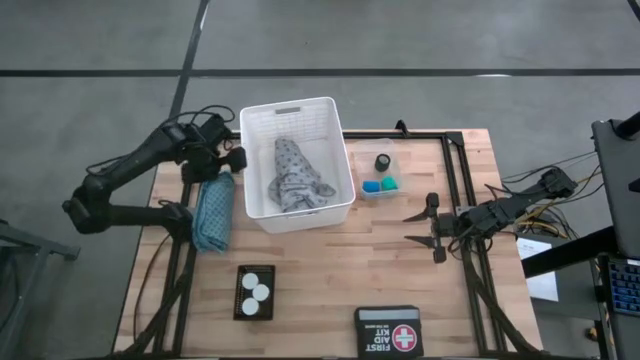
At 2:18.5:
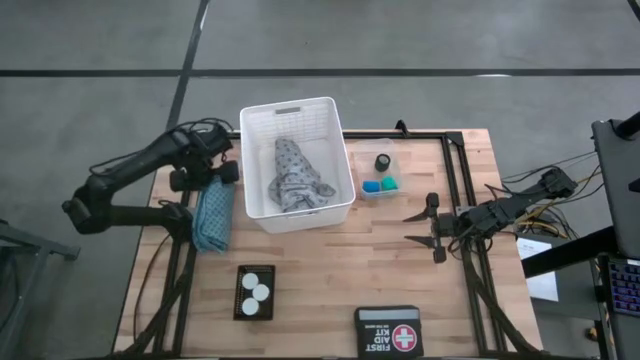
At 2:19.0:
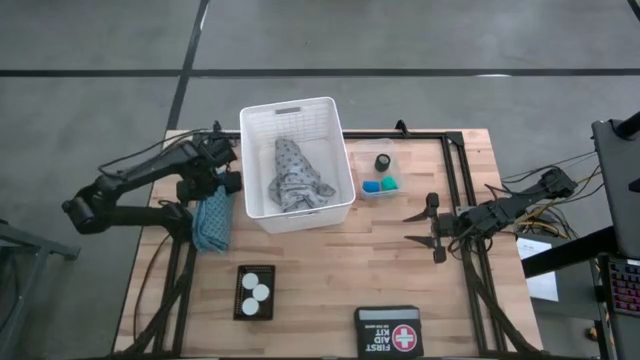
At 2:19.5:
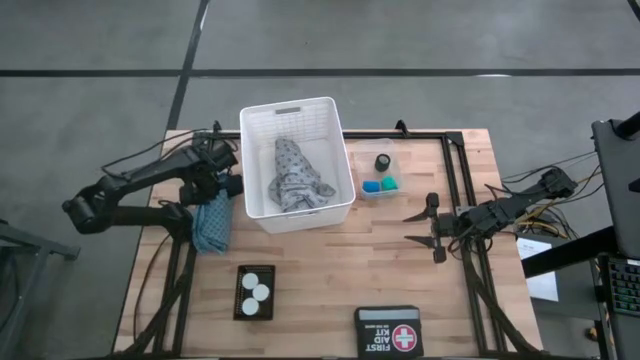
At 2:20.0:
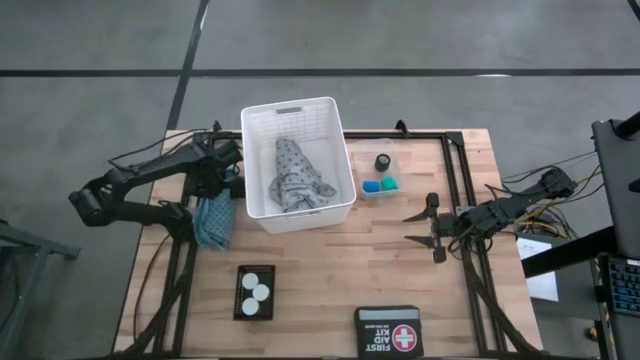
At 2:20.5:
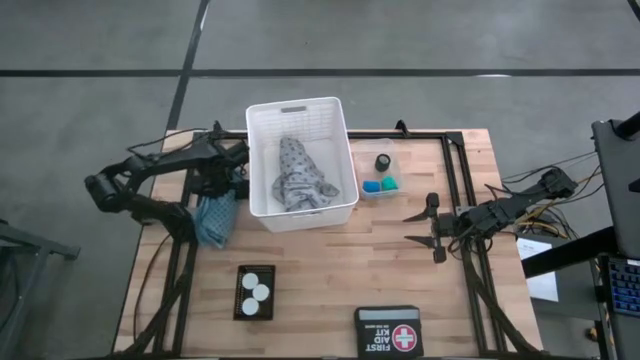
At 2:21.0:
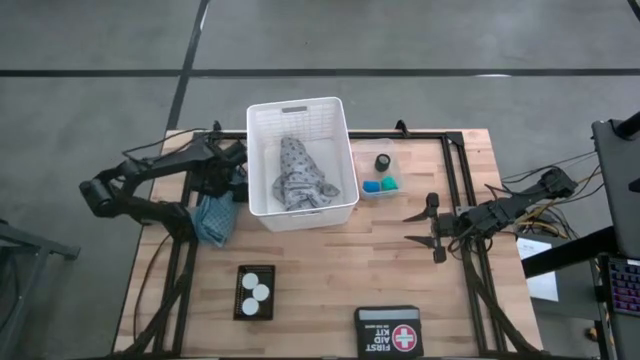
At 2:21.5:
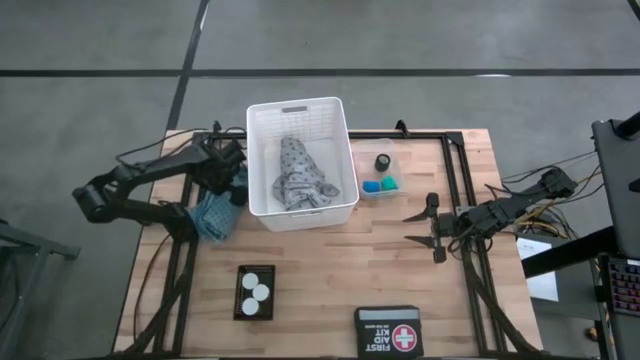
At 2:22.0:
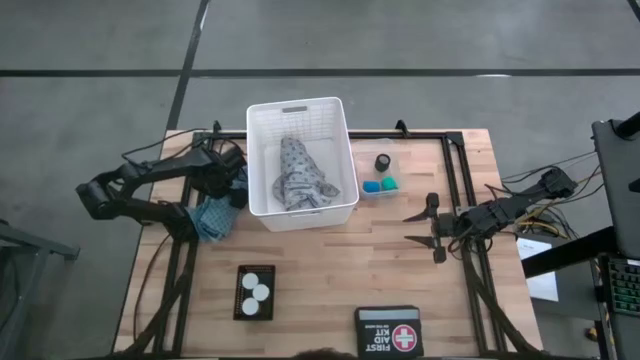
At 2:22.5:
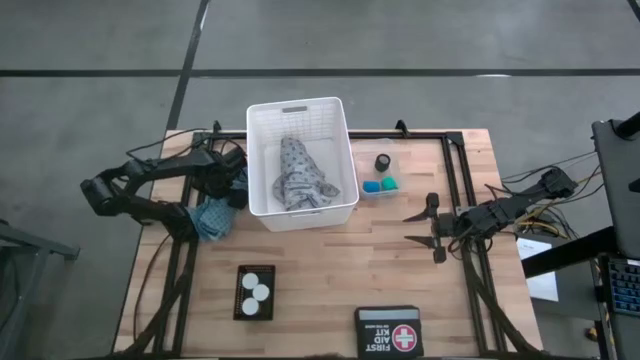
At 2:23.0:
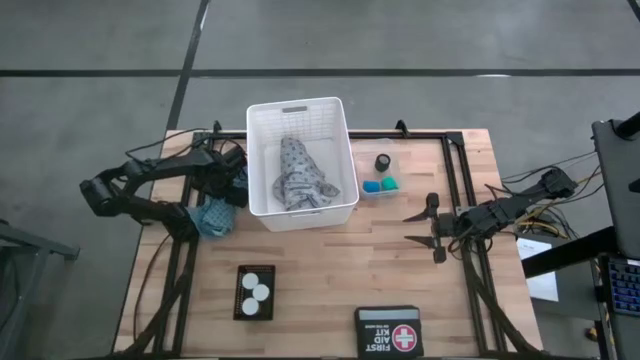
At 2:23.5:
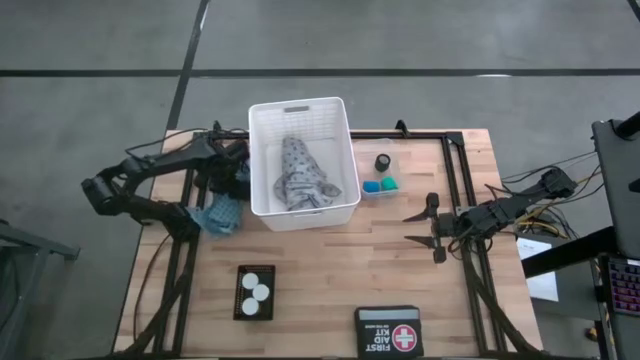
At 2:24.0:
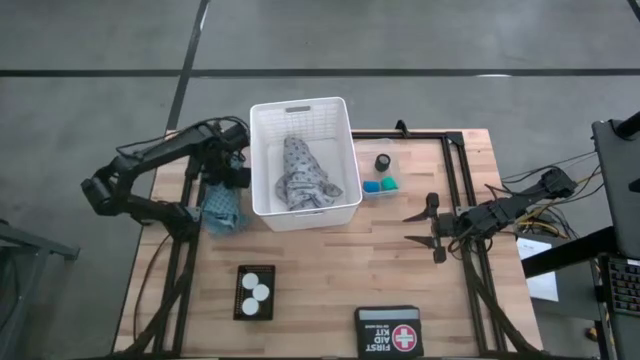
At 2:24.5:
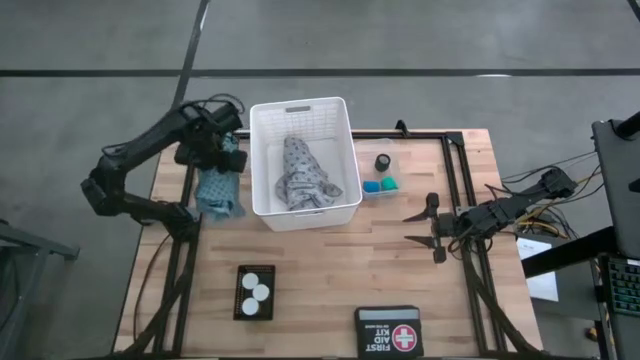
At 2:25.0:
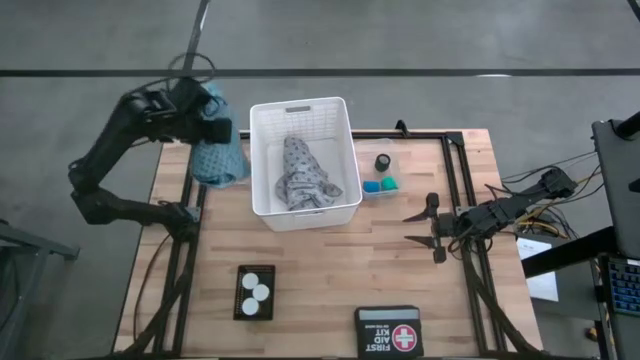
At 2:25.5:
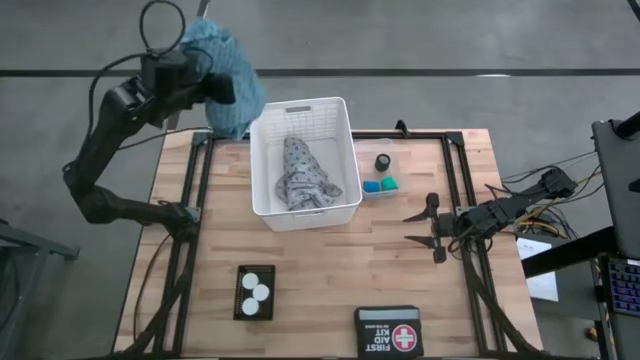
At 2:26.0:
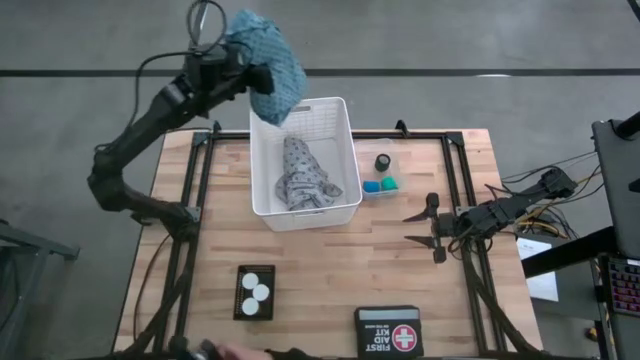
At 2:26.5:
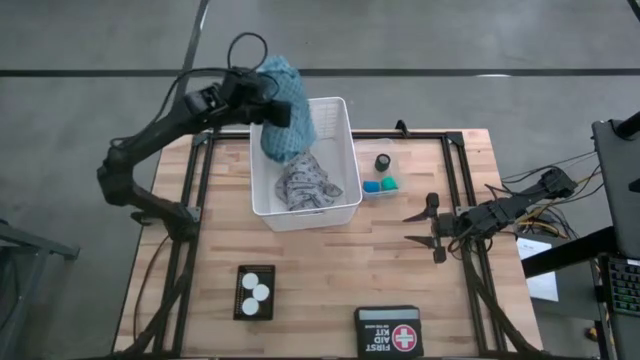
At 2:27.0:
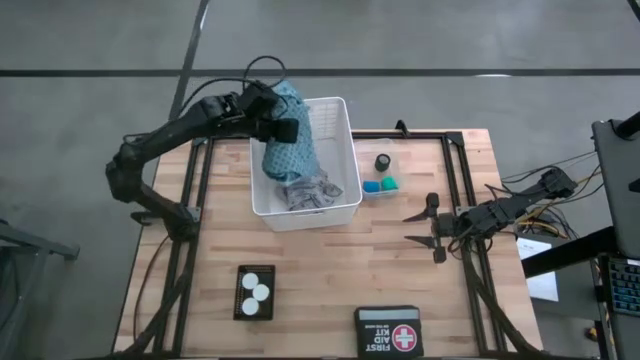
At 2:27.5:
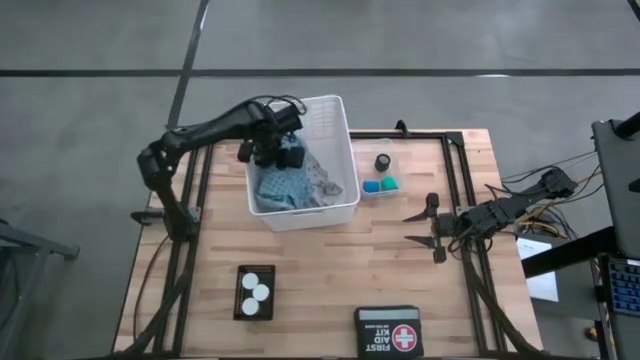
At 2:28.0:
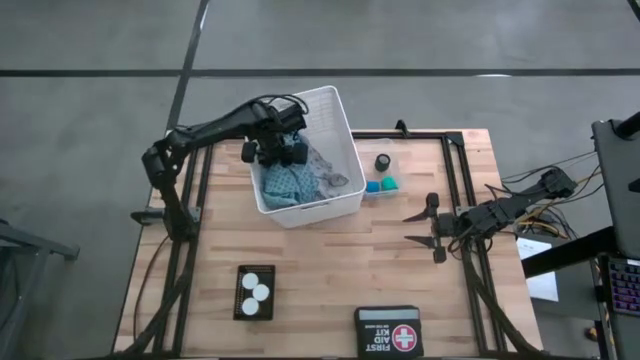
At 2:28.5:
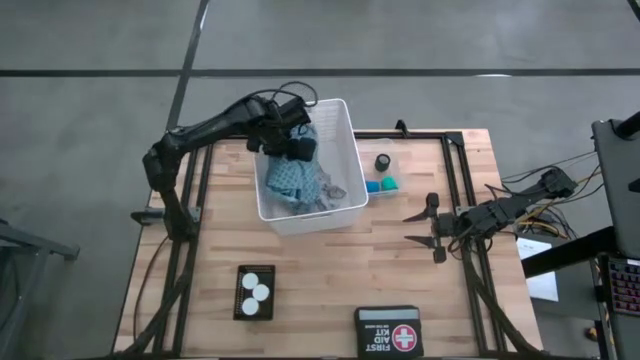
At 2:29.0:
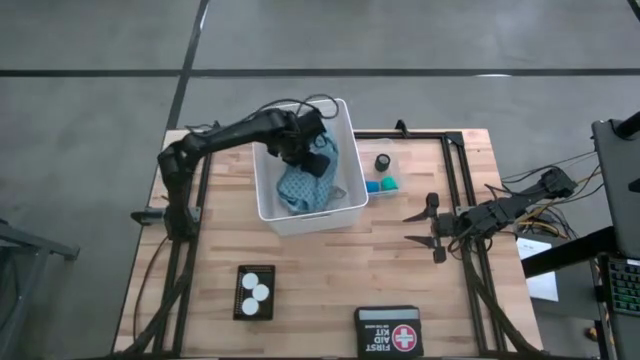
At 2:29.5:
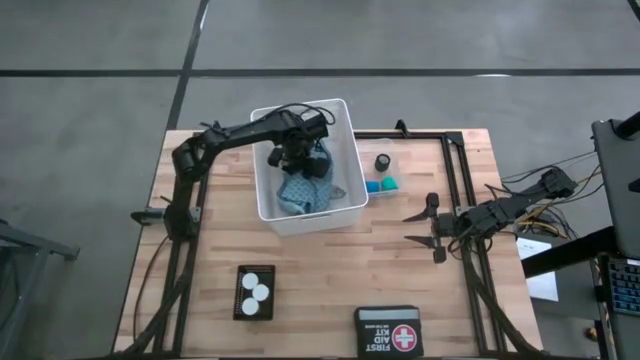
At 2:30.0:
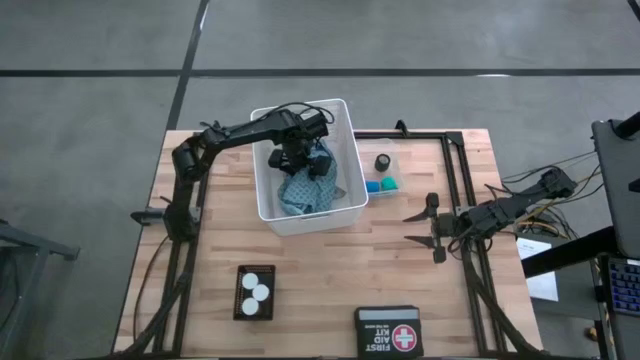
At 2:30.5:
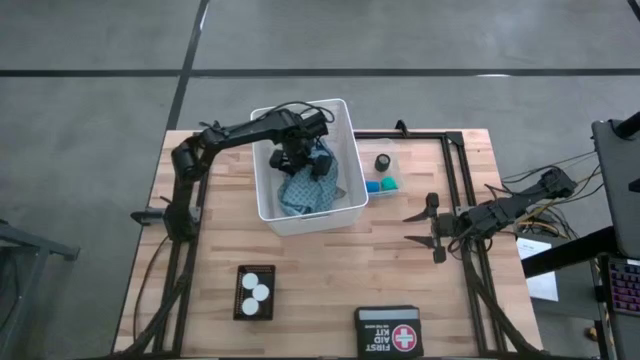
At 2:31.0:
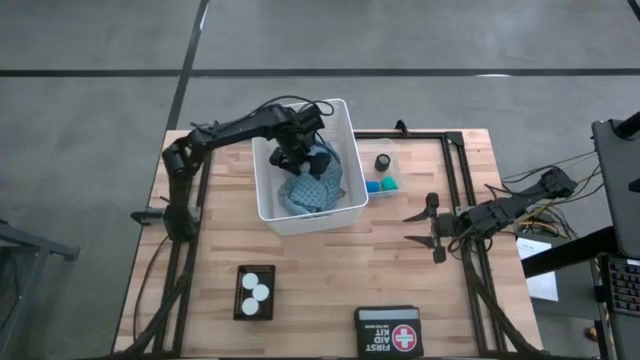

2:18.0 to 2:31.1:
Task: Pick & place medical supplies in basket/bin
Put the blue patient gown into the white bin

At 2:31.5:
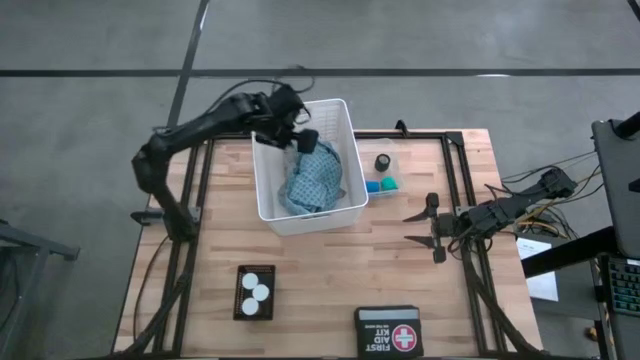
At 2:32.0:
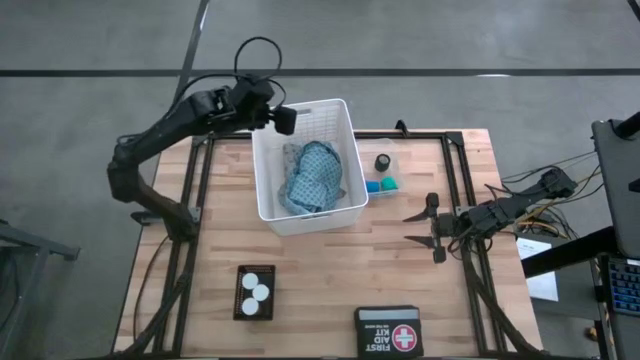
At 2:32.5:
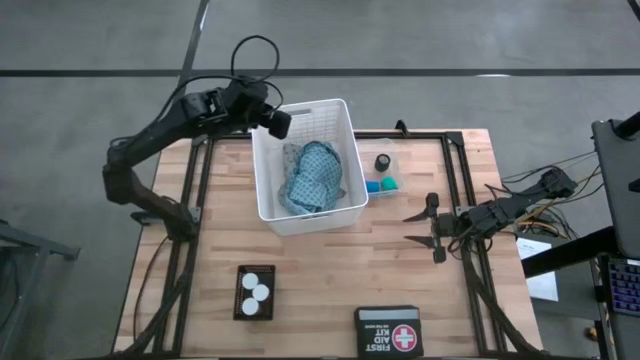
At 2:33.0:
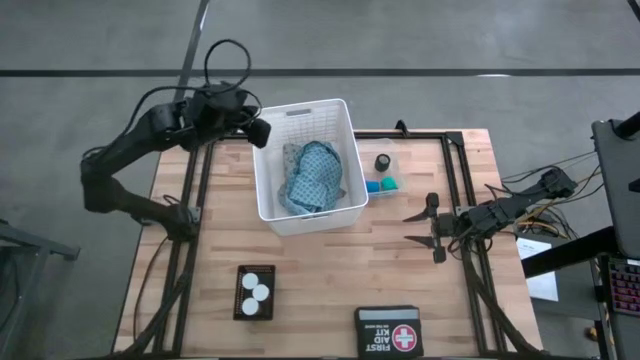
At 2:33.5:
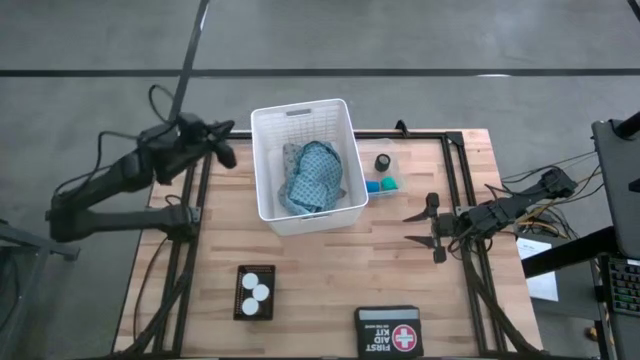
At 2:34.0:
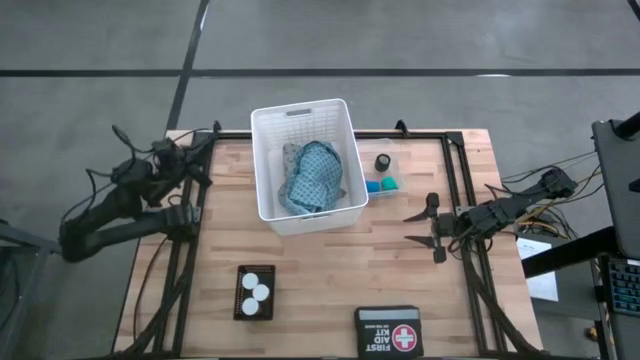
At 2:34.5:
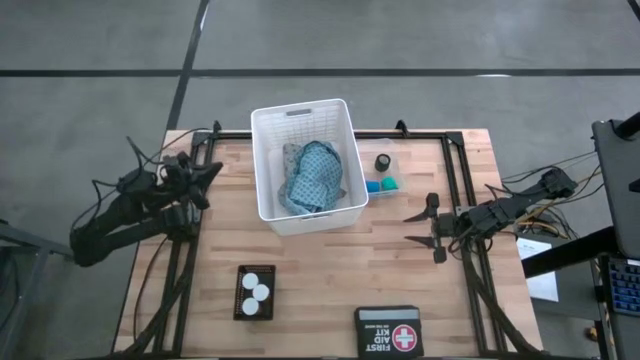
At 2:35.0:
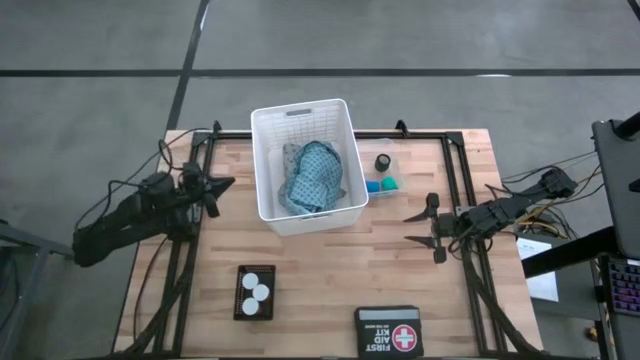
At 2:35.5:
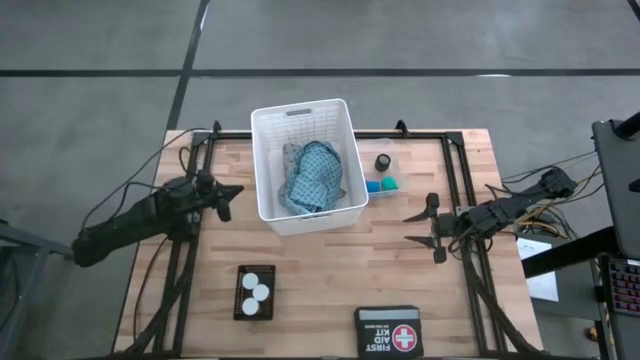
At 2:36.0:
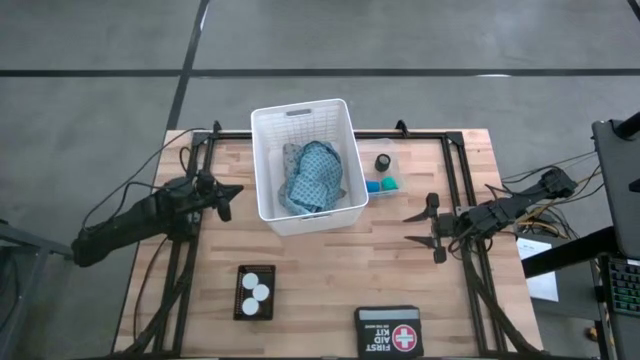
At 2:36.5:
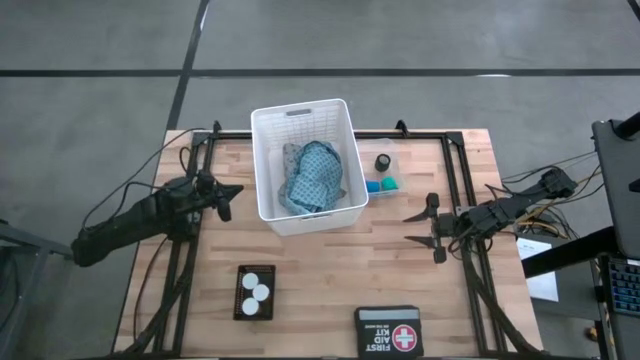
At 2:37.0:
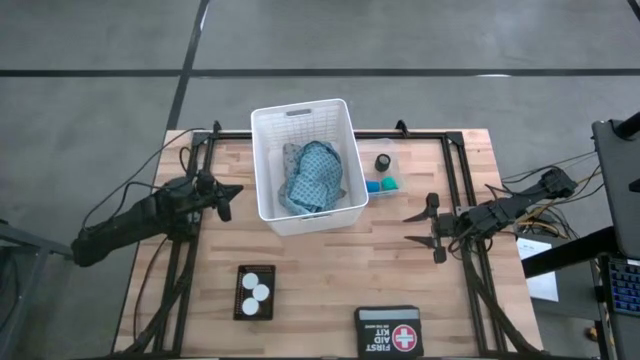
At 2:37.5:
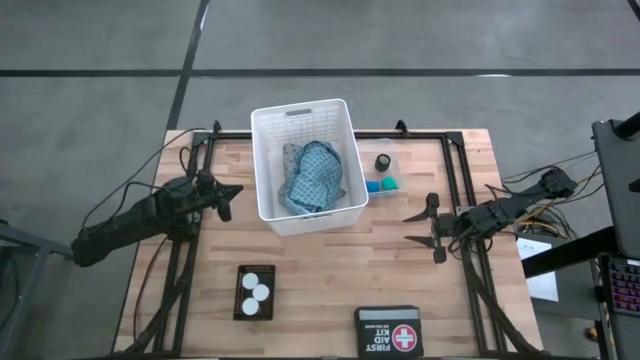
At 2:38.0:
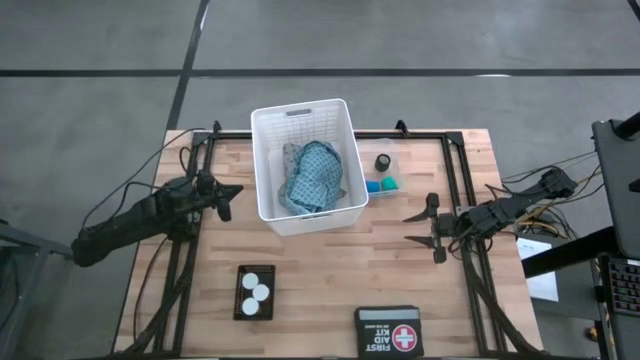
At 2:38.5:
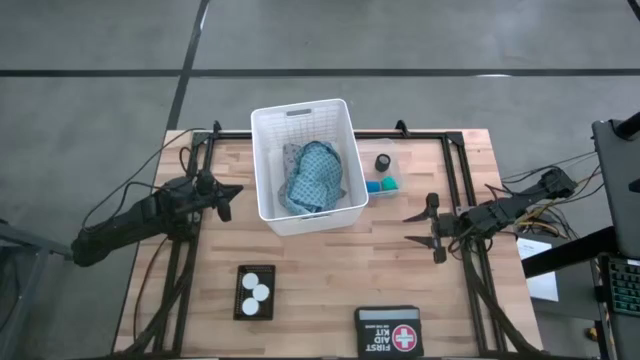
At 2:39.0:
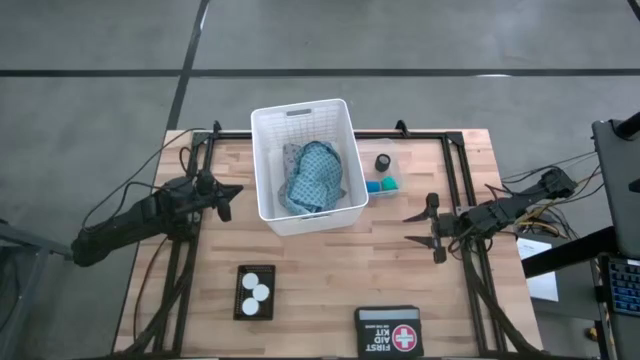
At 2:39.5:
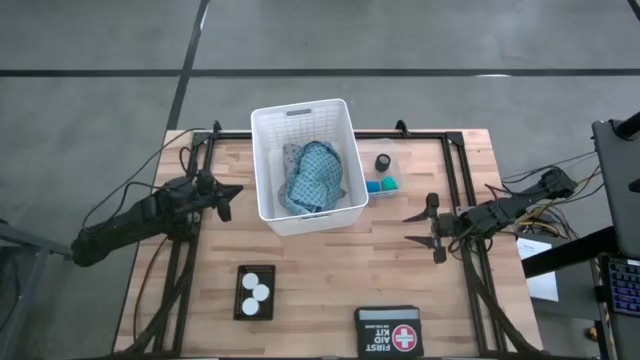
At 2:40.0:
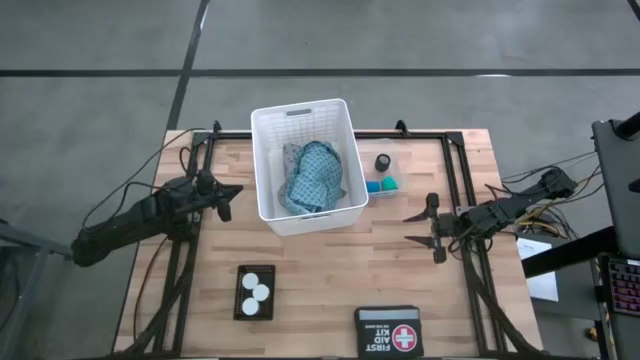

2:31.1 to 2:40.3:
Return to Home Position
